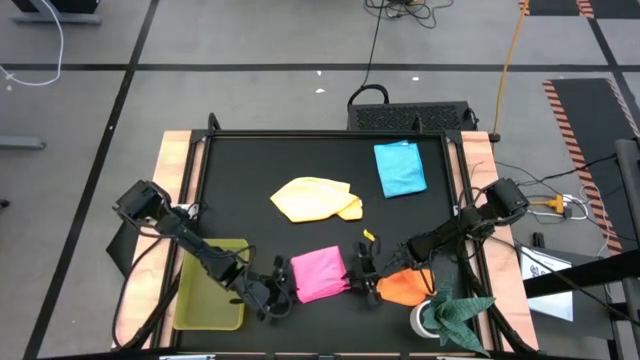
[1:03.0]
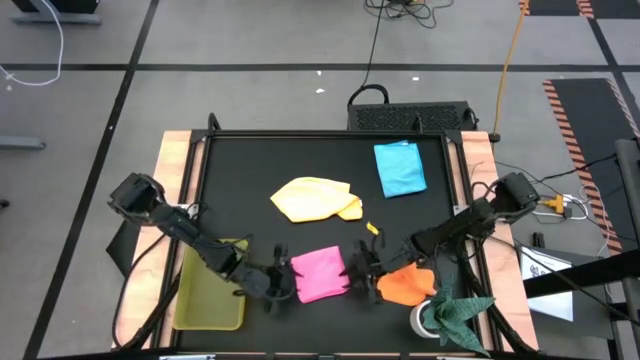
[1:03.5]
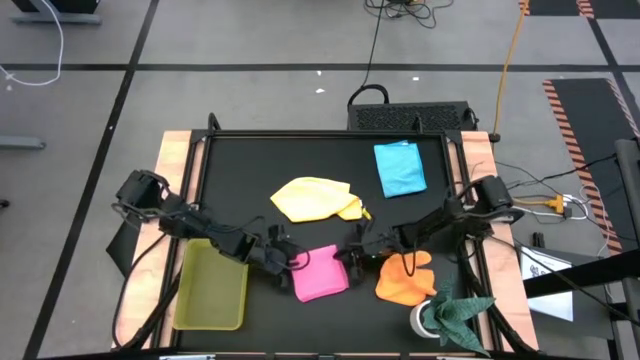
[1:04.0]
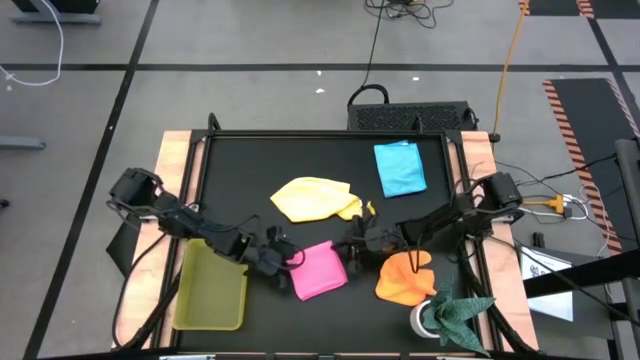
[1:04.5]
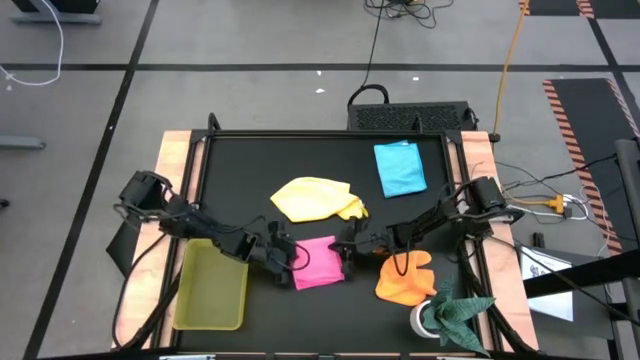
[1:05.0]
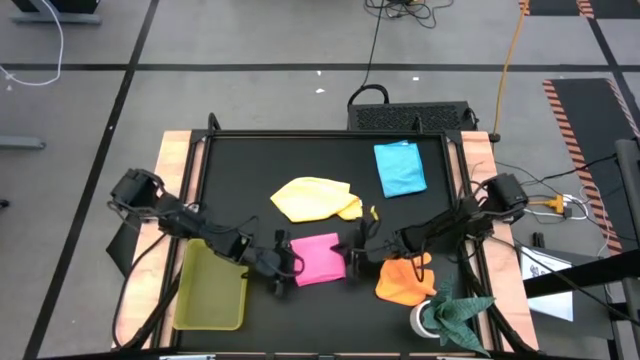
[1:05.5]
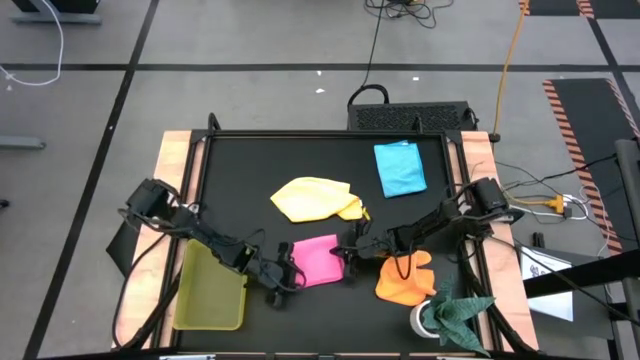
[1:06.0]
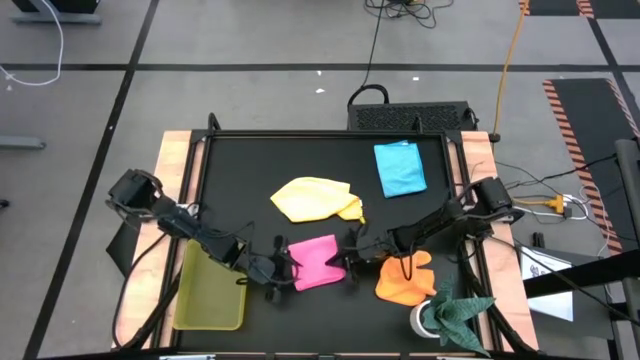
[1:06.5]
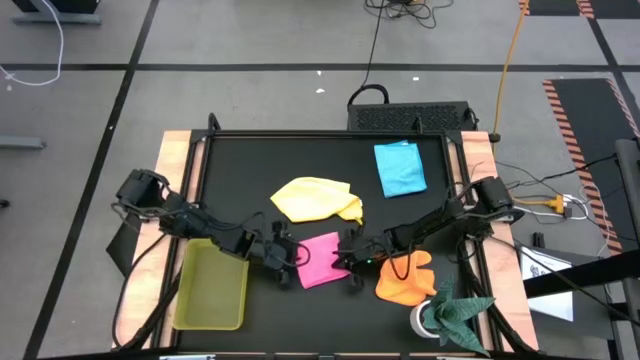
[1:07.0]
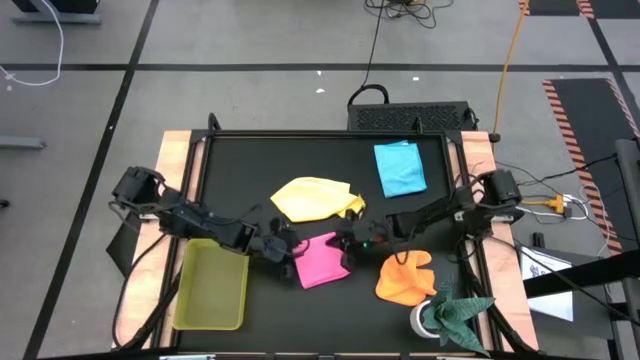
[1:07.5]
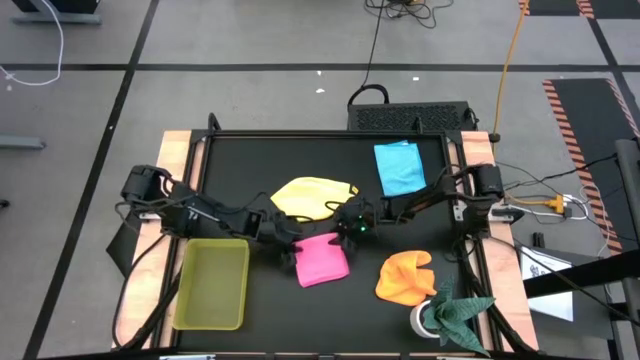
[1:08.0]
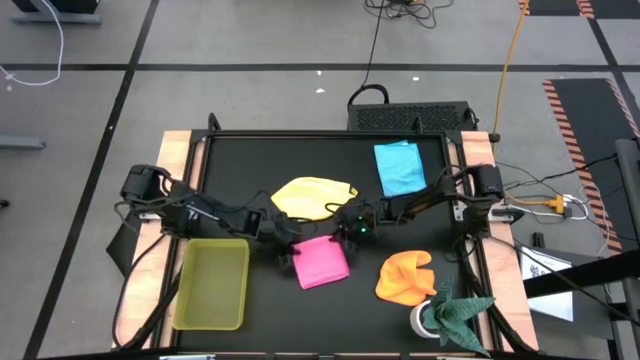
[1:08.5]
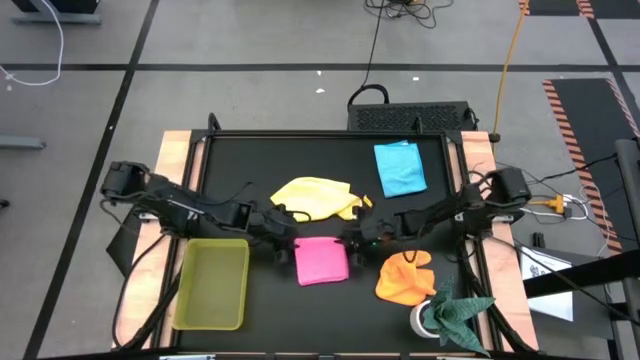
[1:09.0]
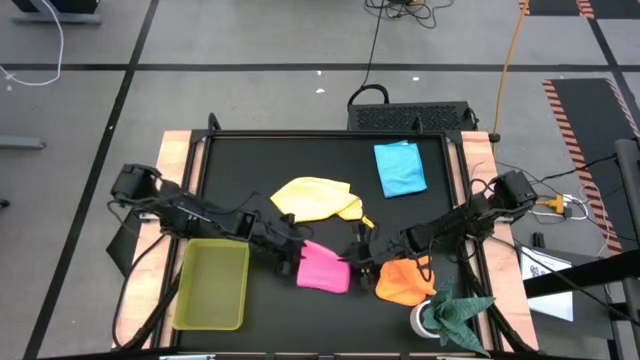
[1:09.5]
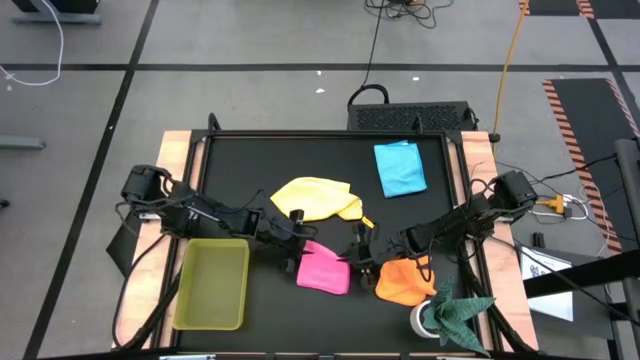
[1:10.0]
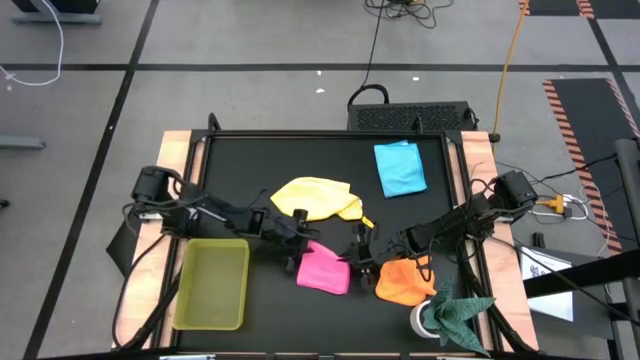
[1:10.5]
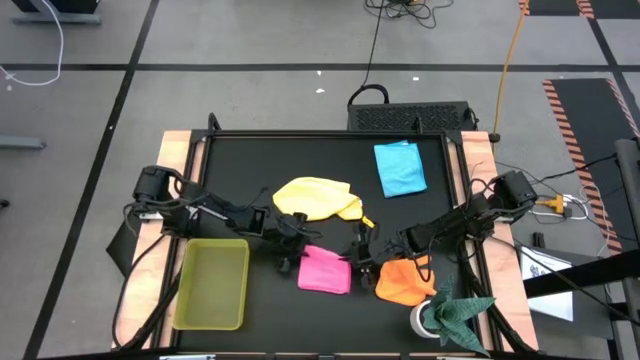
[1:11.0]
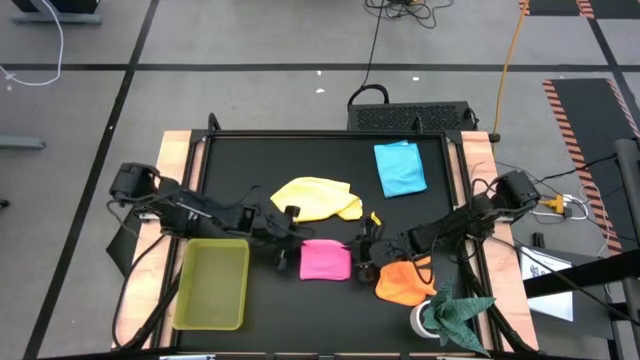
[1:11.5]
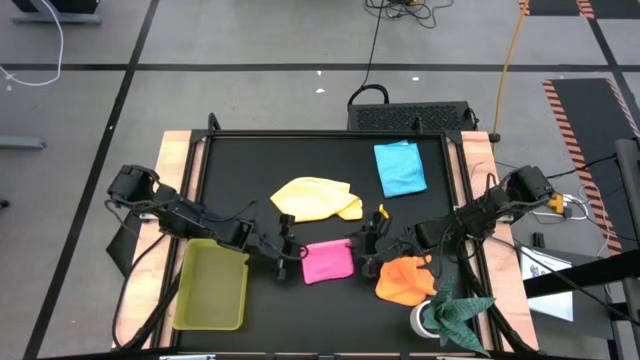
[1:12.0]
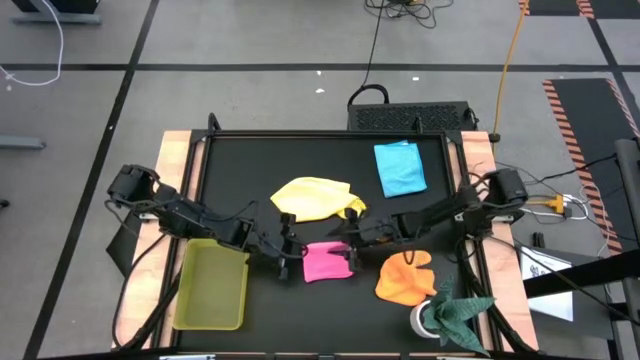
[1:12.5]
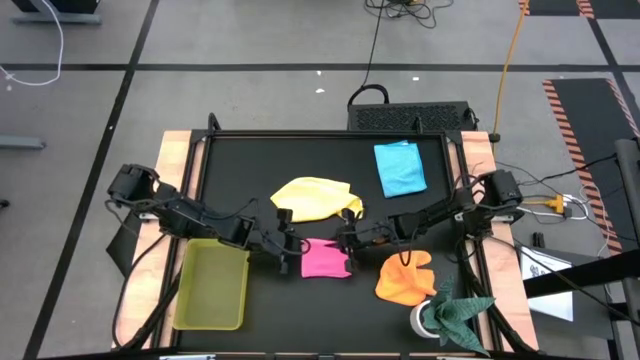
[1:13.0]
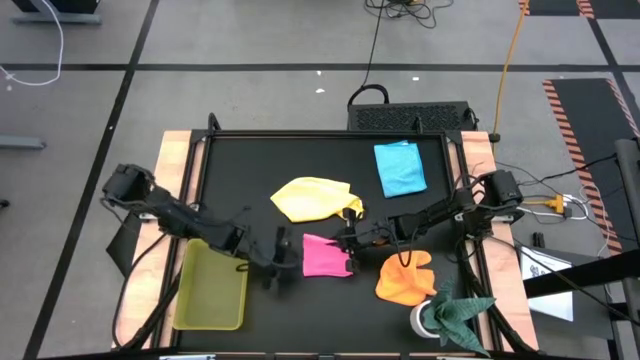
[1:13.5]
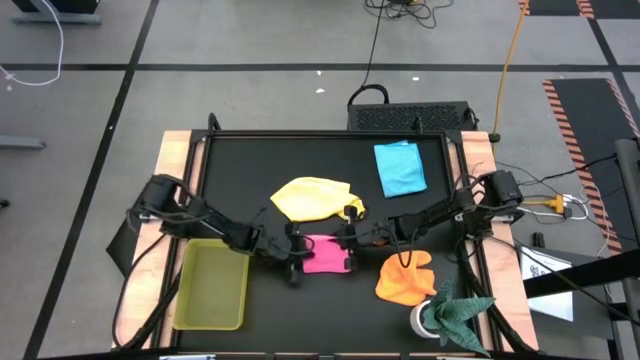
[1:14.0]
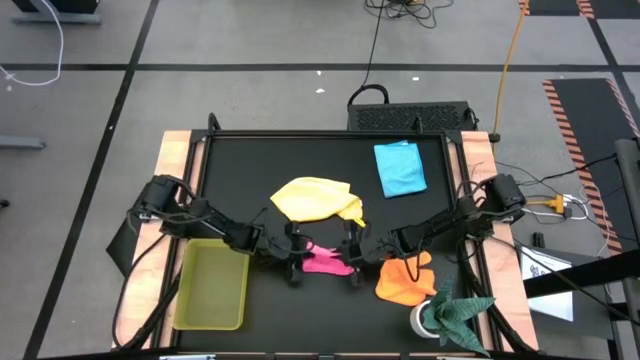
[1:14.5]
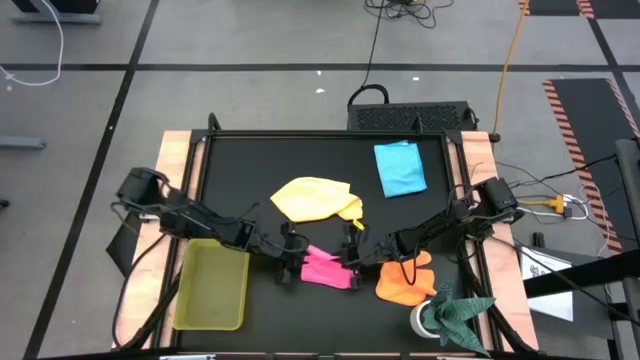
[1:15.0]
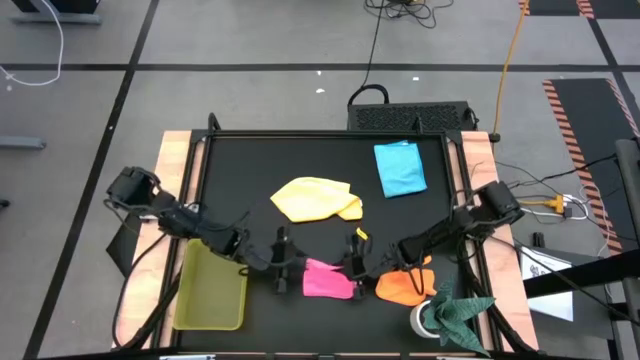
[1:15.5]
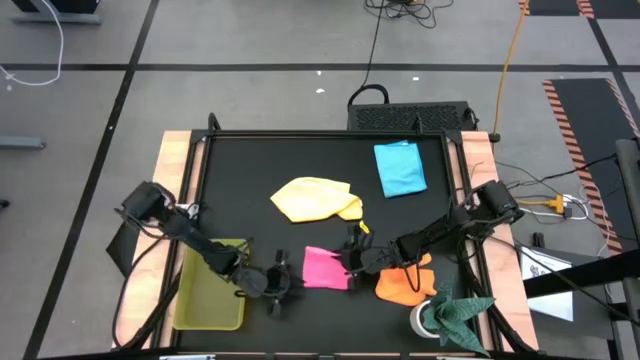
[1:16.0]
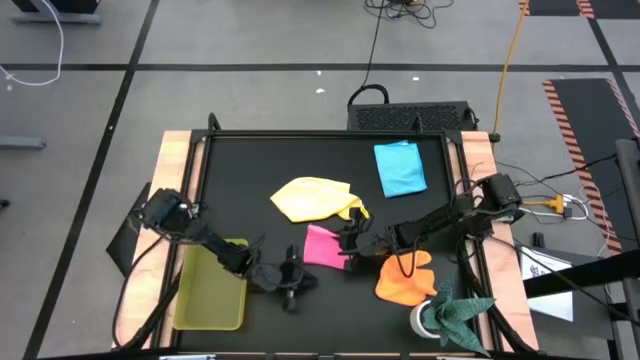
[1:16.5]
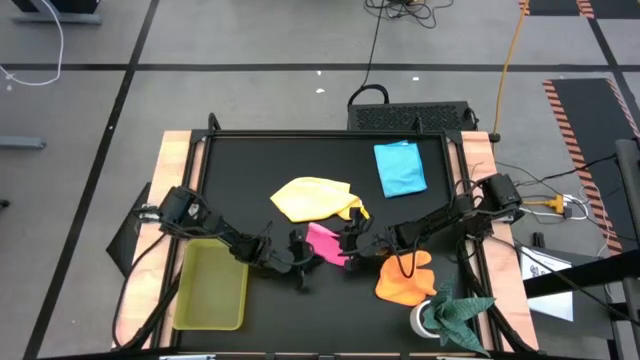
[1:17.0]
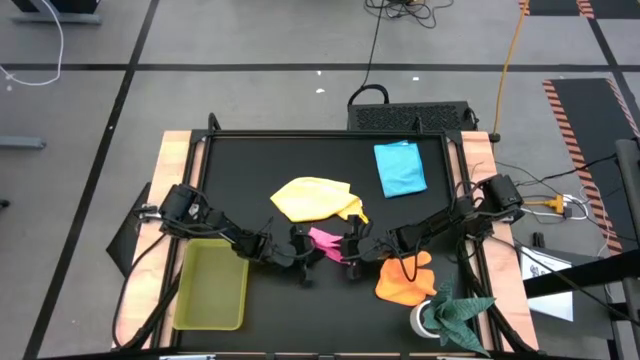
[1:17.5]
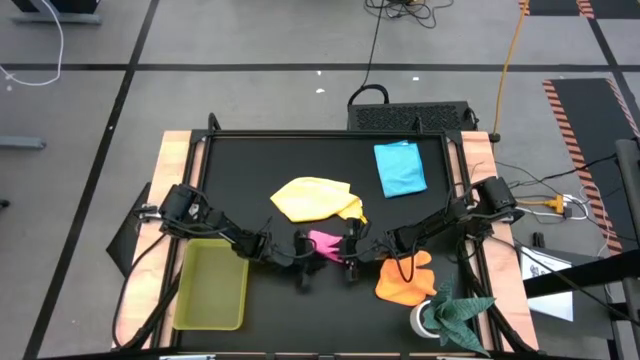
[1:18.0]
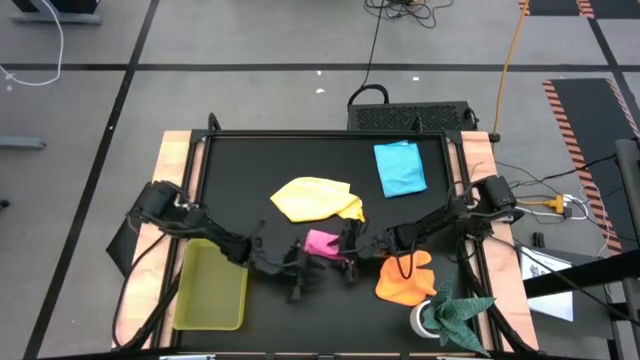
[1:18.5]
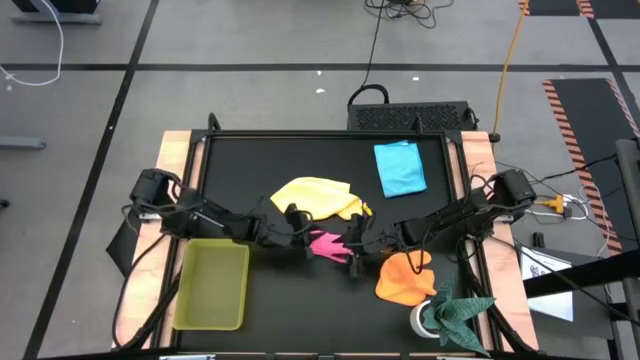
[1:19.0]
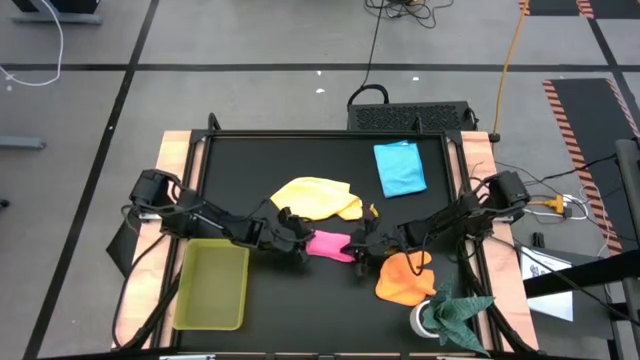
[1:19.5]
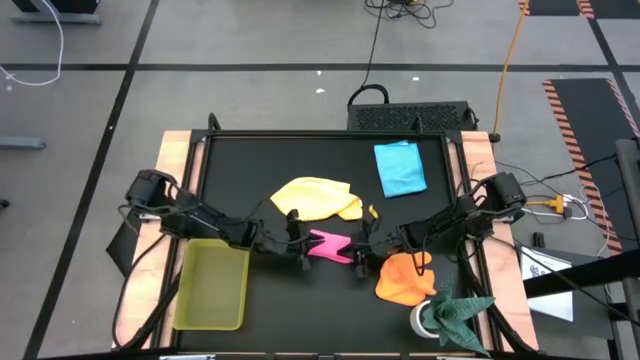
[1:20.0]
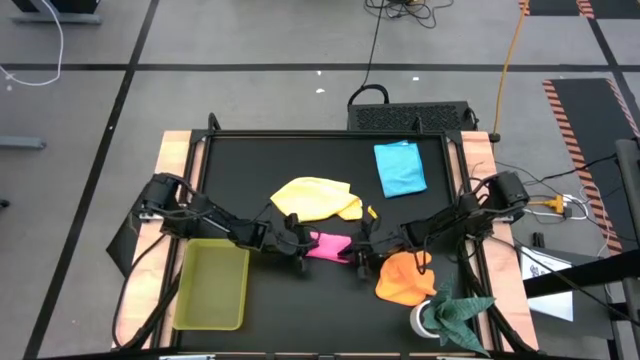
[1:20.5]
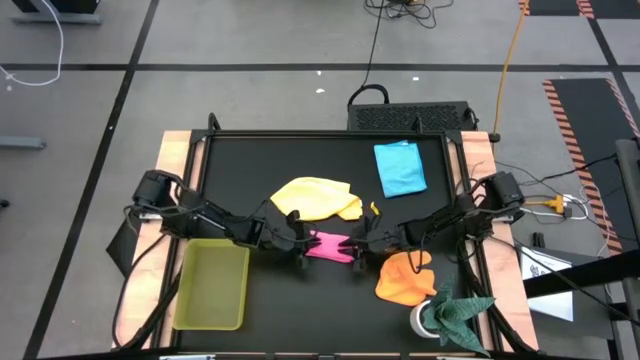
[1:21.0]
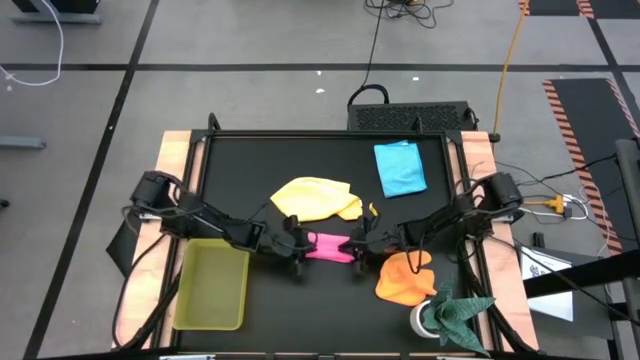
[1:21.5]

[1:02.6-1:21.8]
Task: Fold microfiber towels
Fold the pink microfiber towel

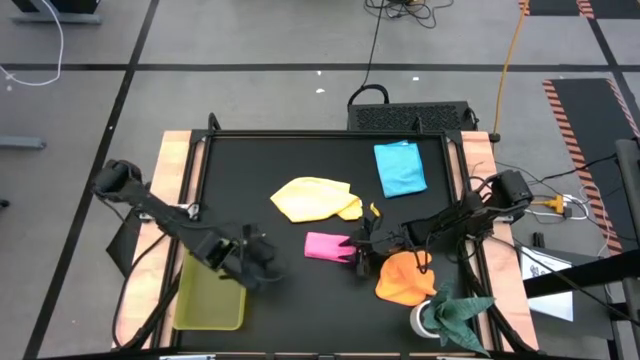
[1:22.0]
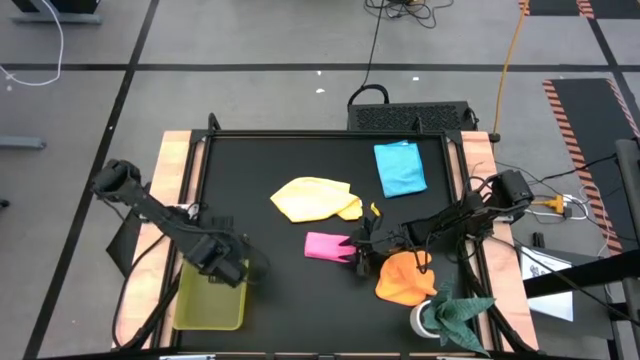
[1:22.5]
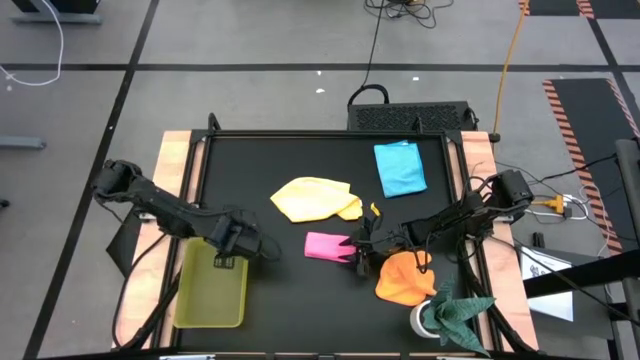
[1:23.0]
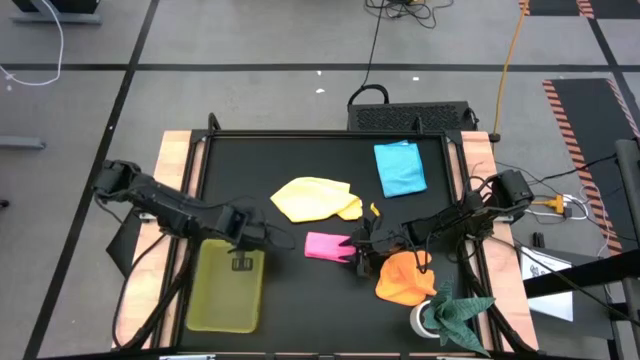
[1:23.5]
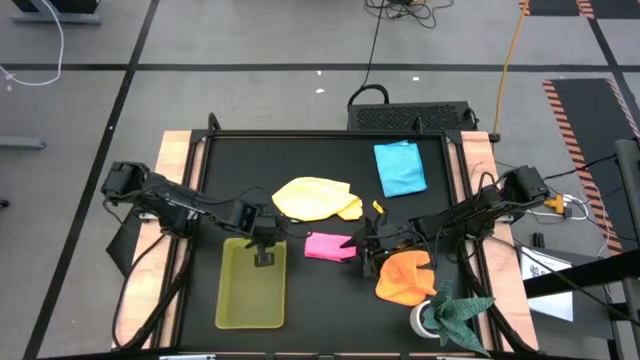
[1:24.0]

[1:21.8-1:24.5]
Adjust the yellow bin on the table
